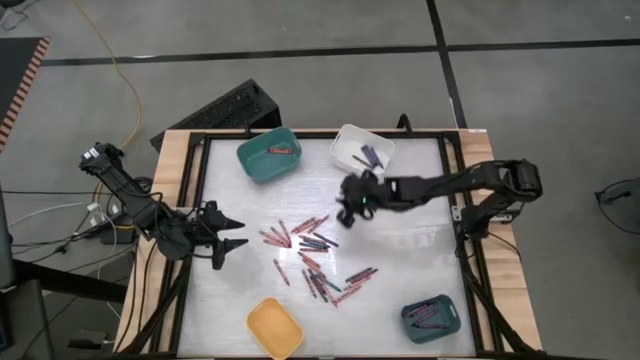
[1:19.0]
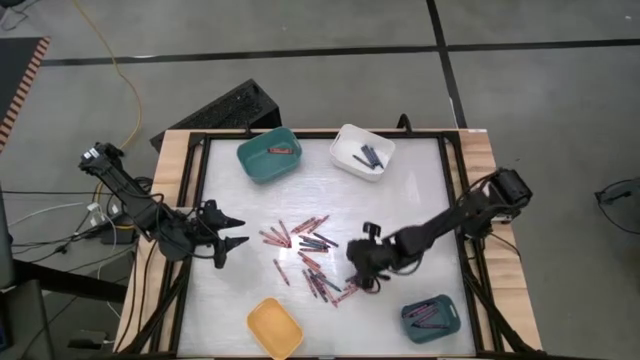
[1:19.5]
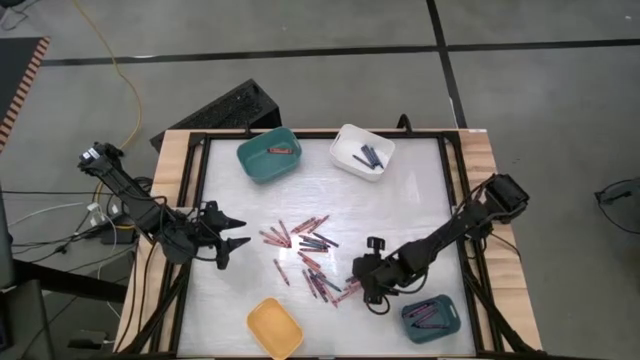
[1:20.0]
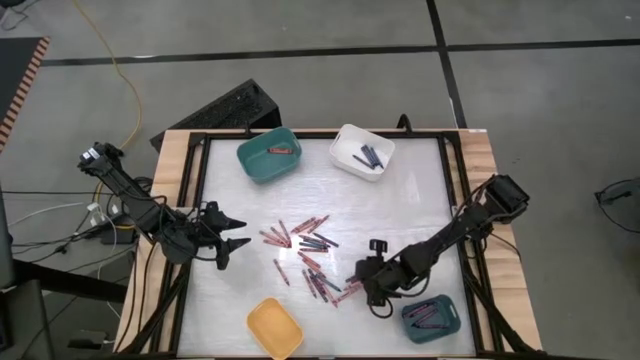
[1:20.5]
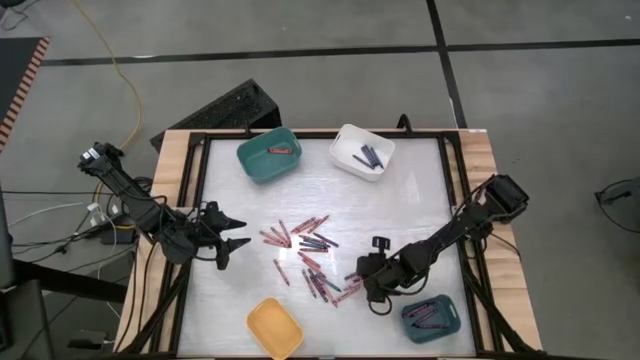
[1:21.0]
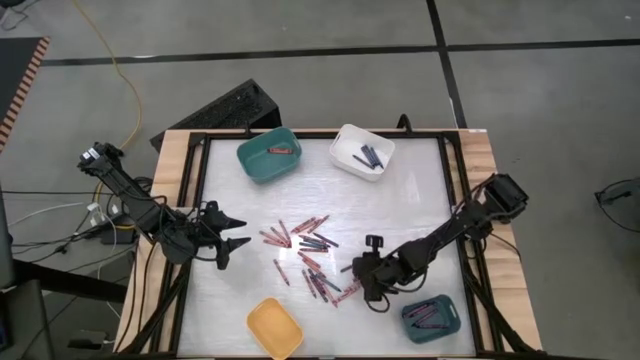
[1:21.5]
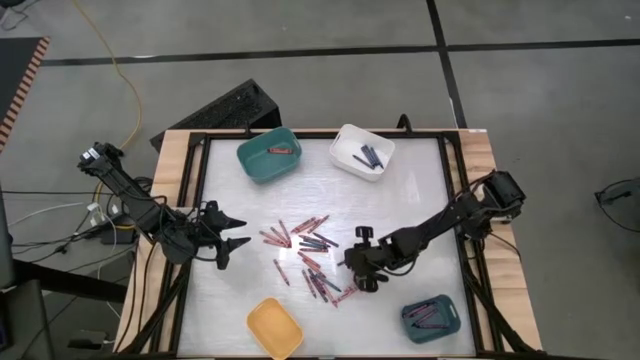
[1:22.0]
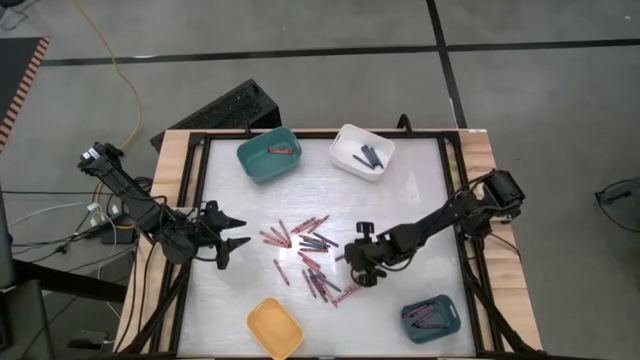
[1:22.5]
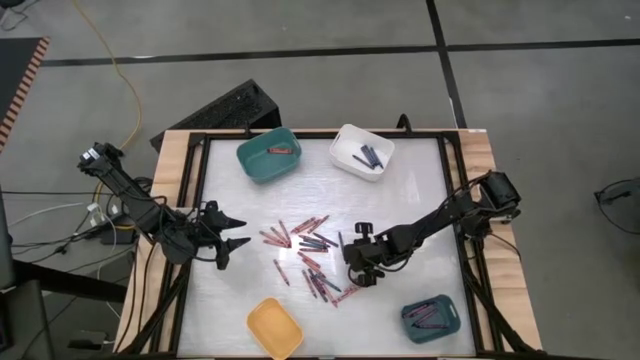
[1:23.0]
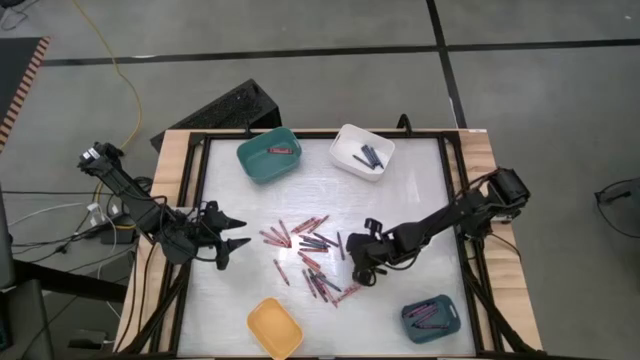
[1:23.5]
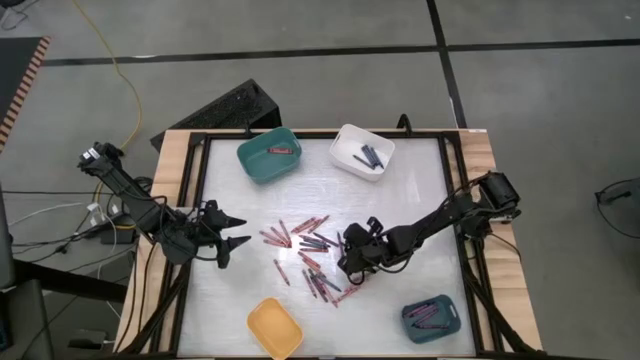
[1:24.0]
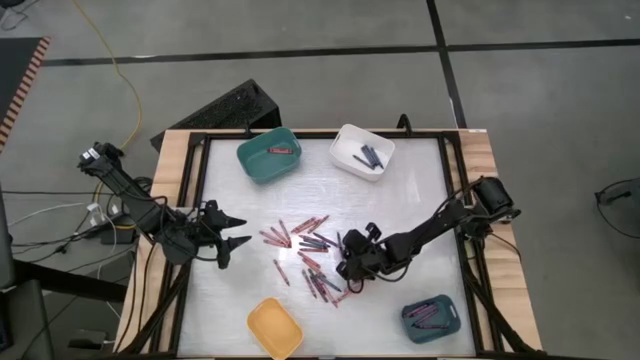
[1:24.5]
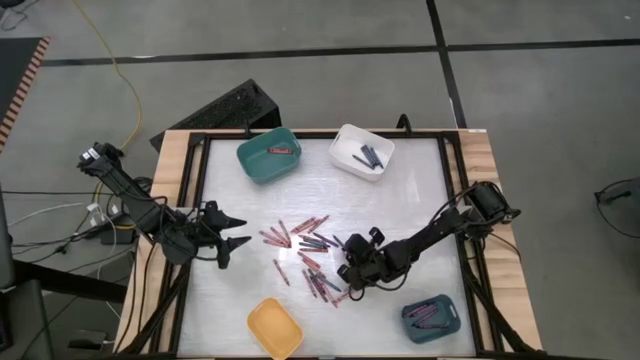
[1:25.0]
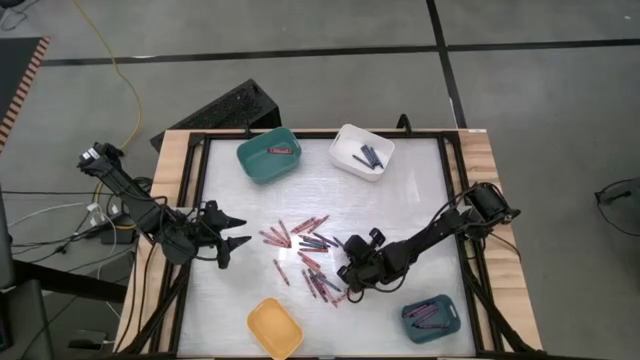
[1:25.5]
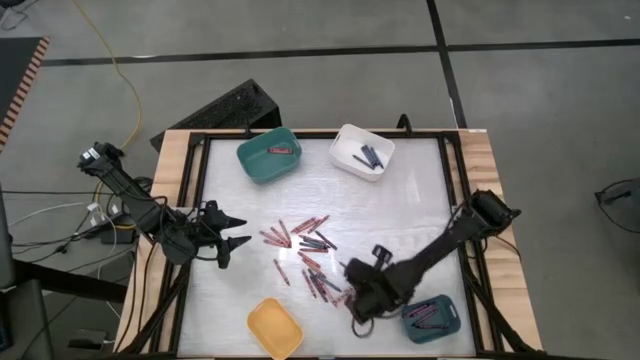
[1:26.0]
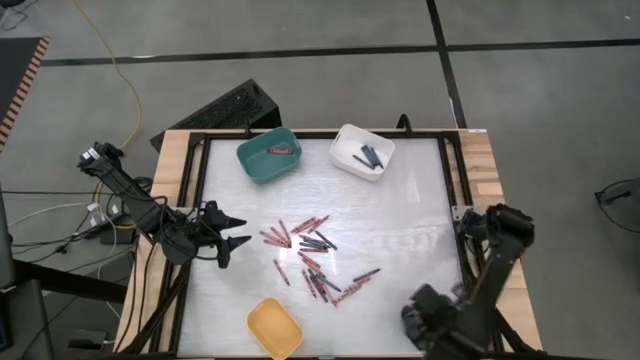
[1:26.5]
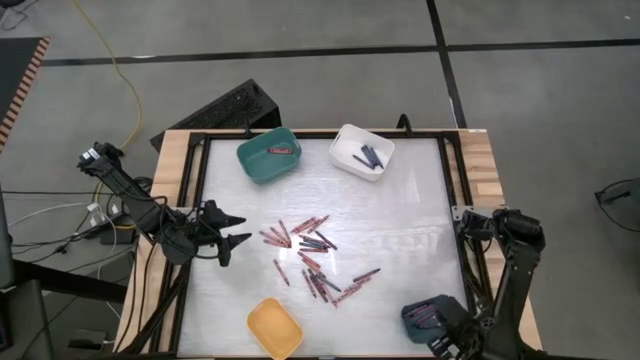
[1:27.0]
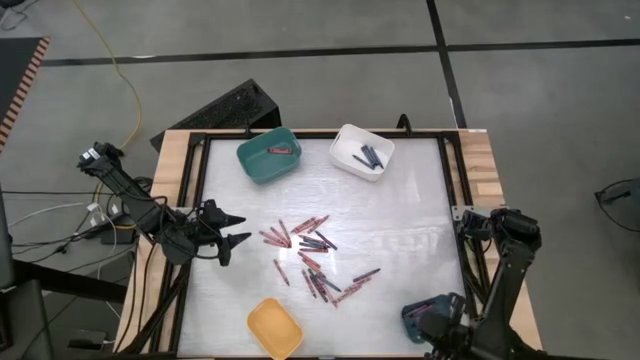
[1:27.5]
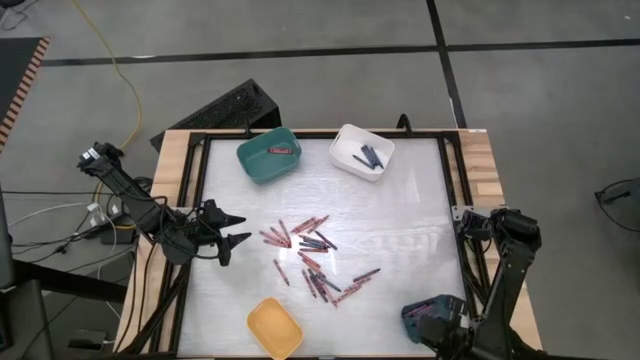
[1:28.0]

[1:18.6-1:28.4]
Task: Sort crayons
Put the purple crayon into the blue bin

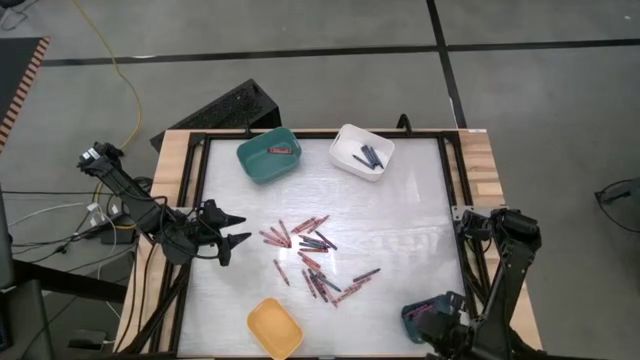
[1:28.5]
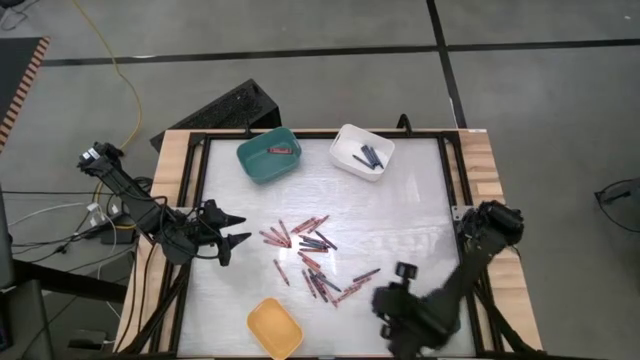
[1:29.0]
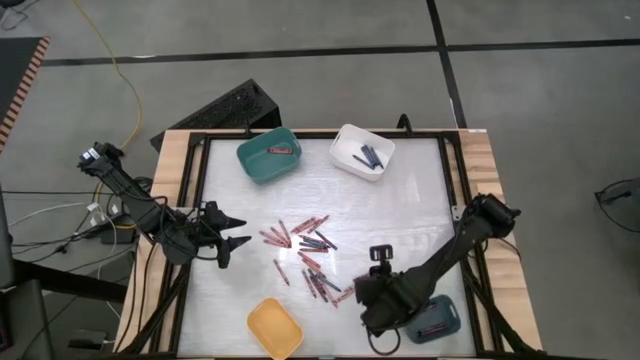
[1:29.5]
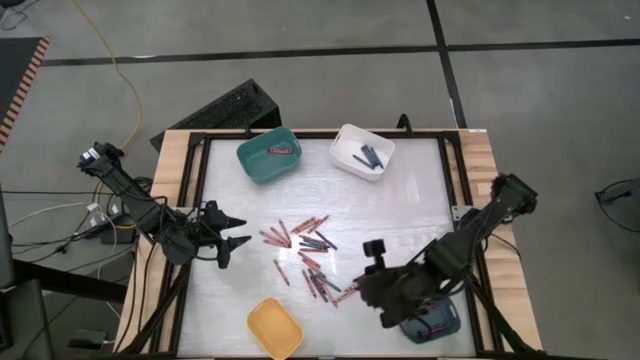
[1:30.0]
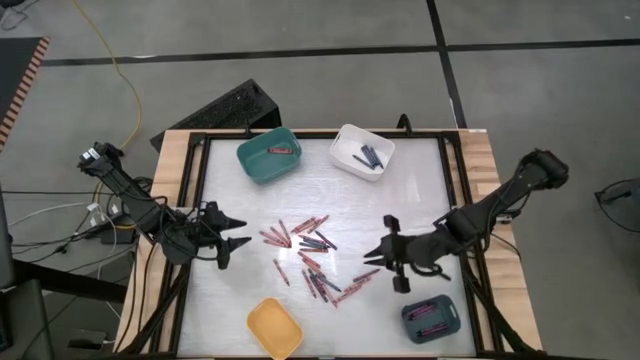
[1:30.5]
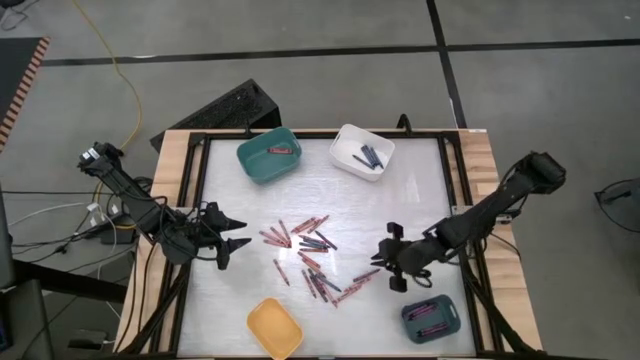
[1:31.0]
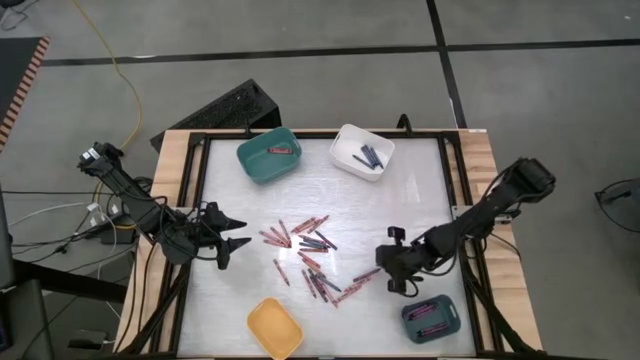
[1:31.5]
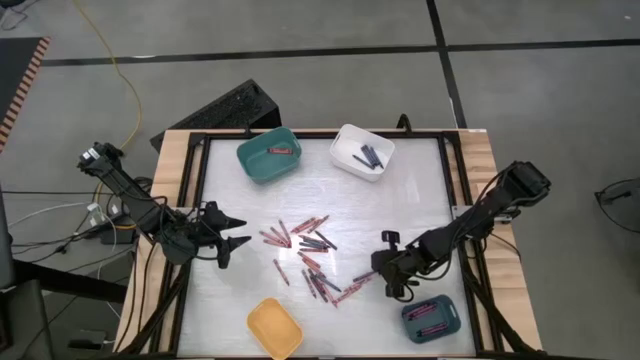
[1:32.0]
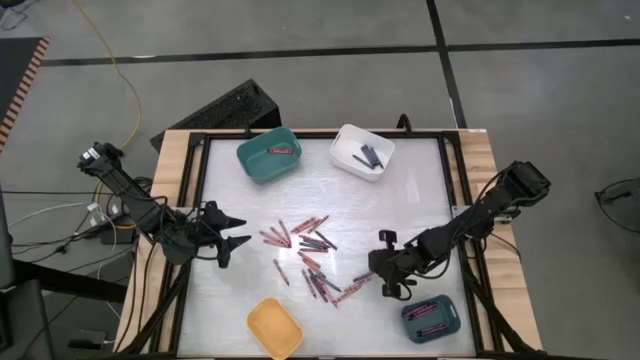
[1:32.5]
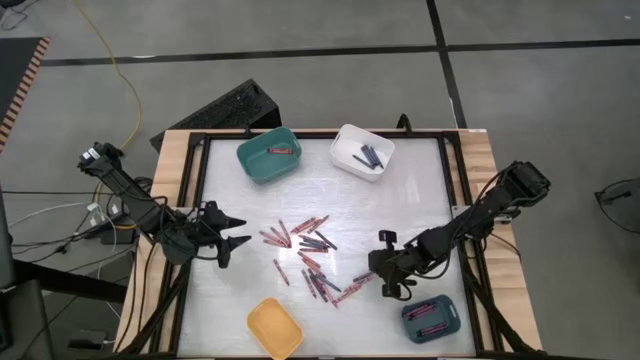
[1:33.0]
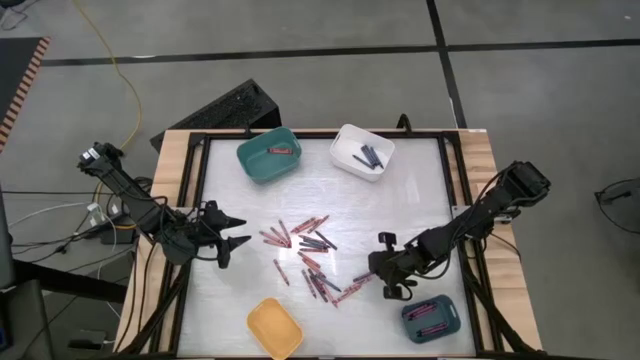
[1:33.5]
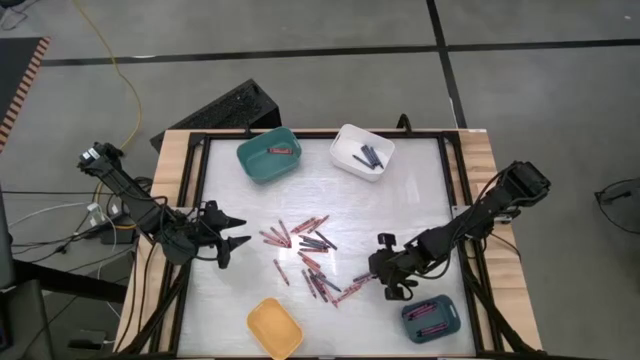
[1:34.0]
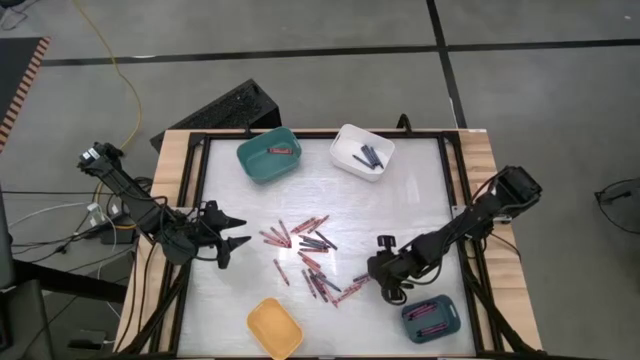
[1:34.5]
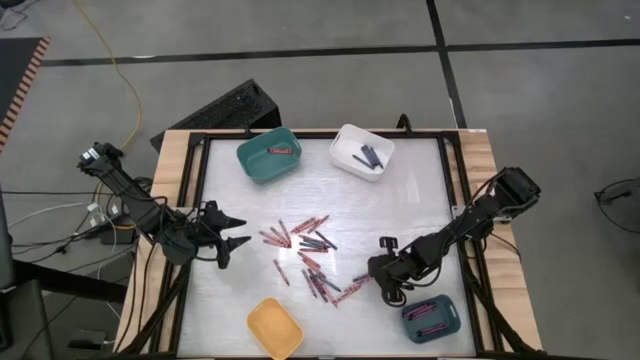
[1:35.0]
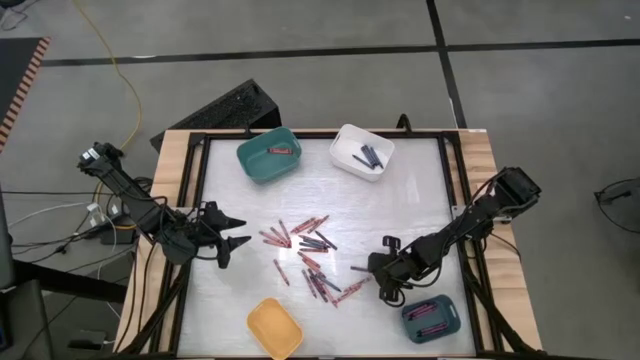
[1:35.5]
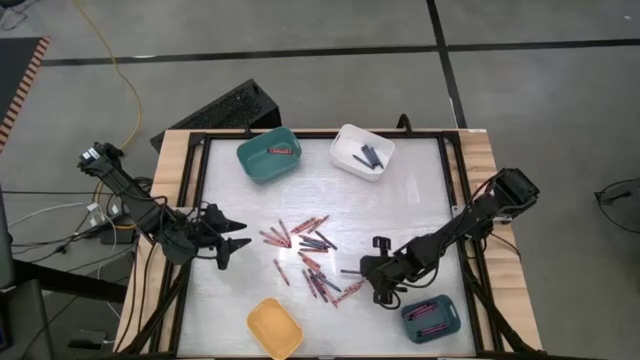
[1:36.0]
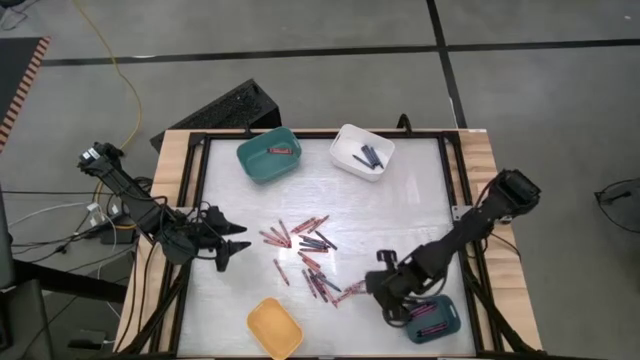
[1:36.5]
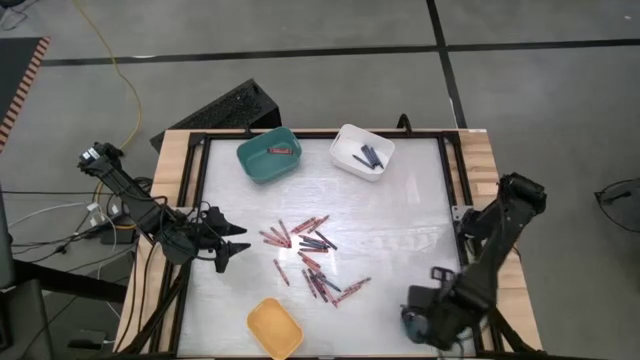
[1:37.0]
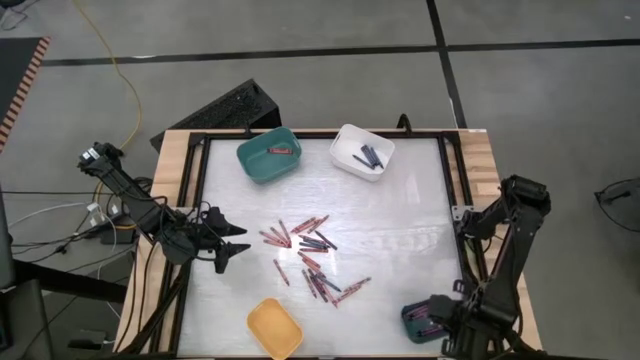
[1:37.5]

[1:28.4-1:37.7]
Put the purple crayon into the blue bin

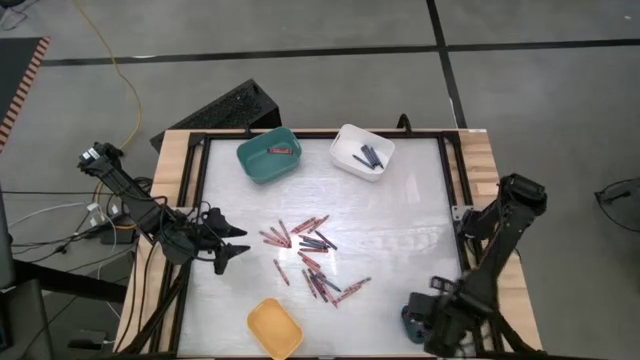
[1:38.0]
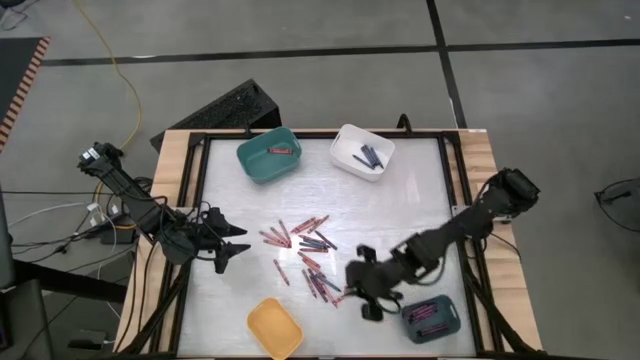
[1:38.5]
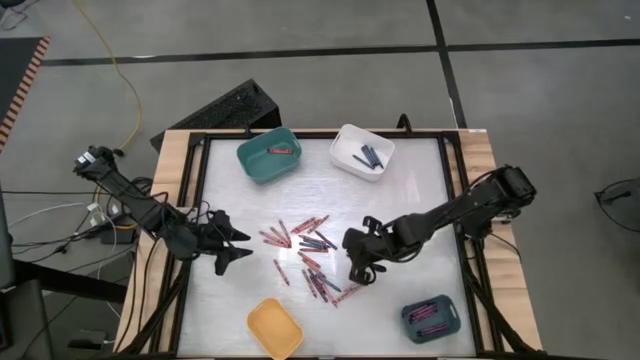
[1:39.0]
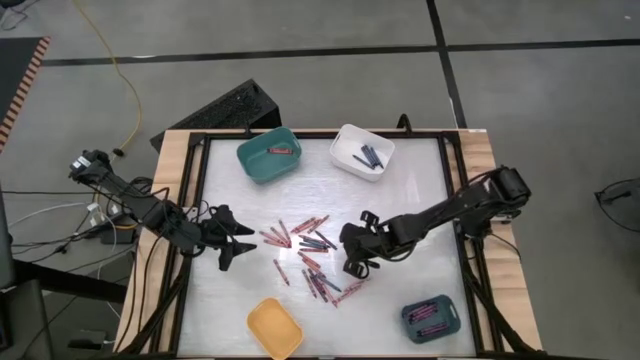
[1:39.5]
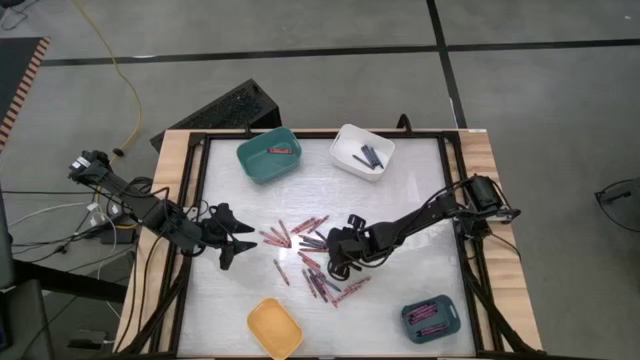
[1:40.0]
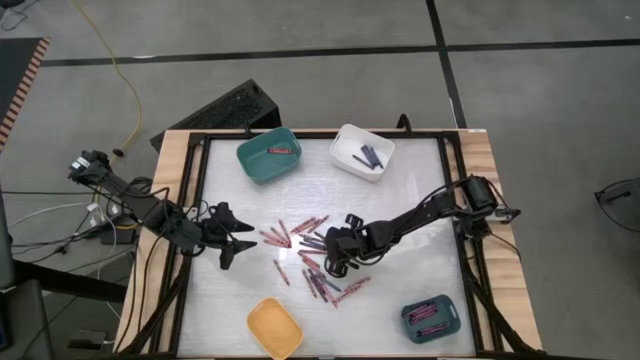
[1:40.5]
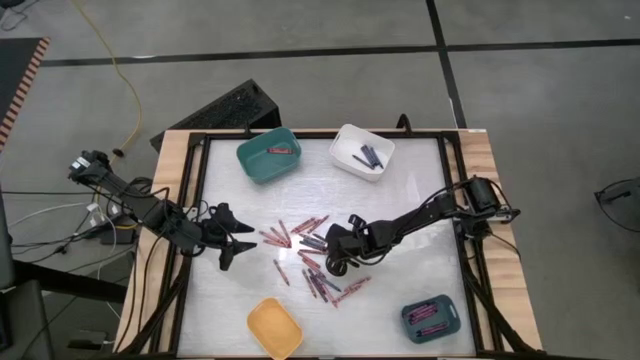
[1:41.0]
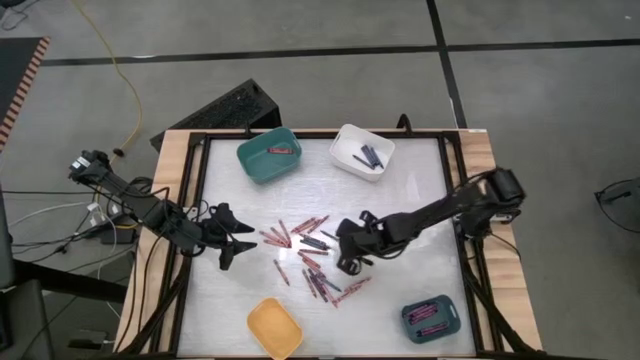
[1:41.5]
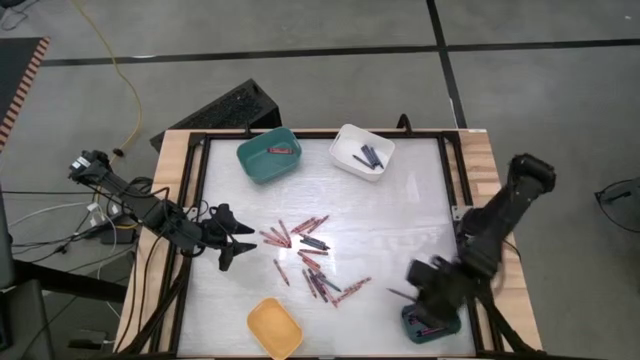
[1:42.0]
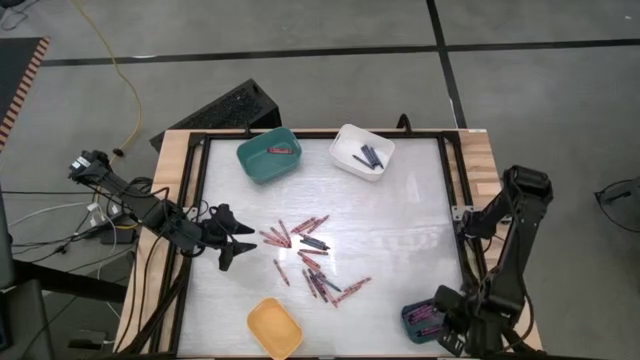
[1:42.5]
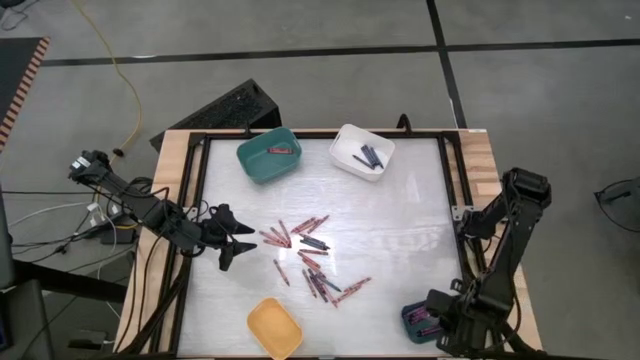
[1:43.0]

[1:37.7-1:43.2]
Put the purple crayon into the blue bin
